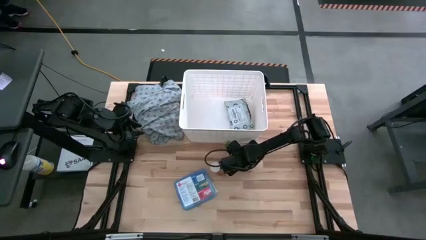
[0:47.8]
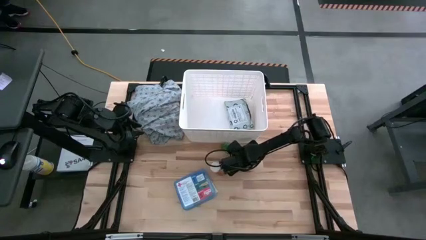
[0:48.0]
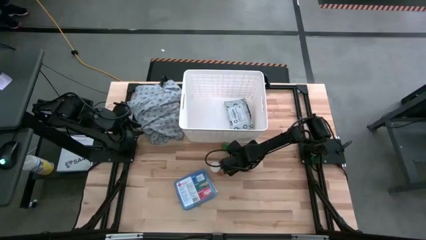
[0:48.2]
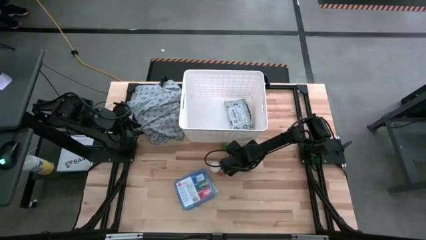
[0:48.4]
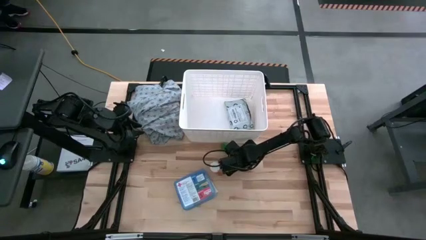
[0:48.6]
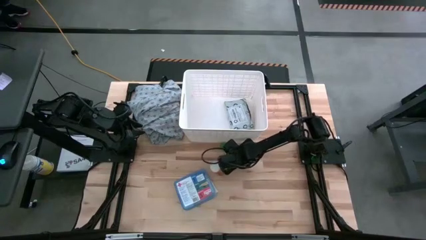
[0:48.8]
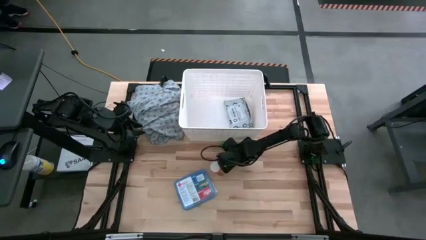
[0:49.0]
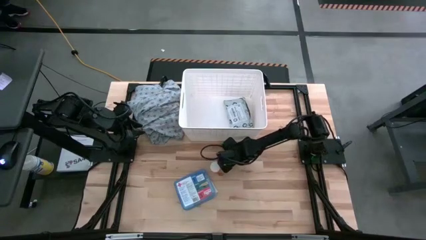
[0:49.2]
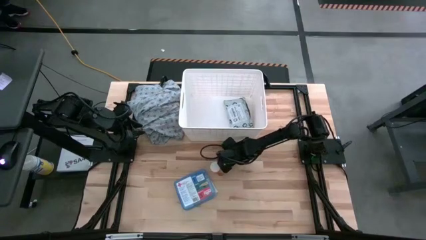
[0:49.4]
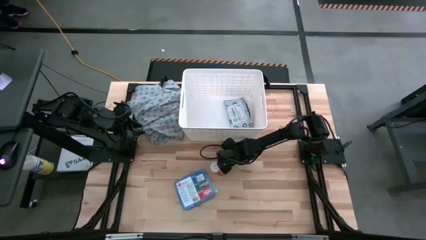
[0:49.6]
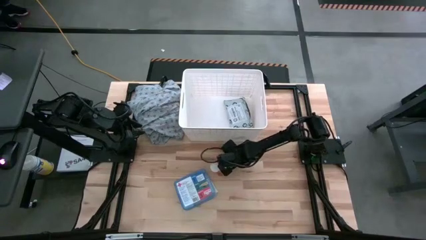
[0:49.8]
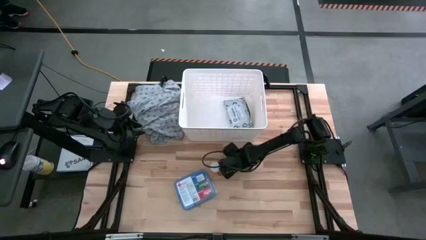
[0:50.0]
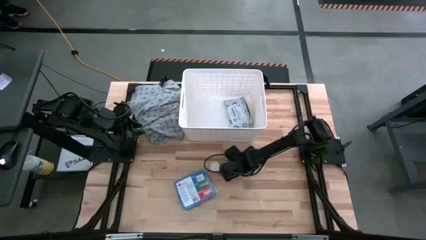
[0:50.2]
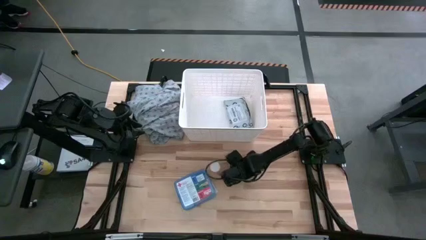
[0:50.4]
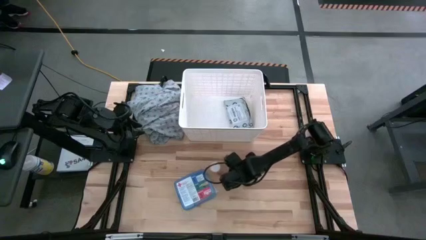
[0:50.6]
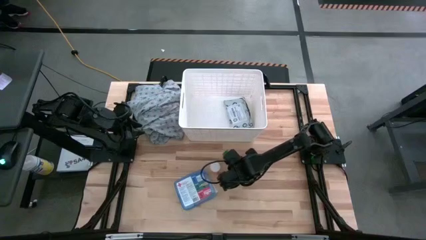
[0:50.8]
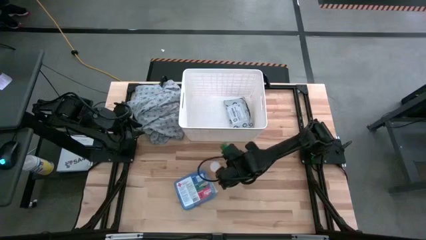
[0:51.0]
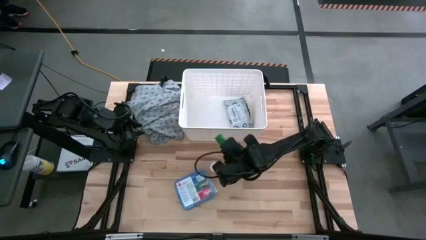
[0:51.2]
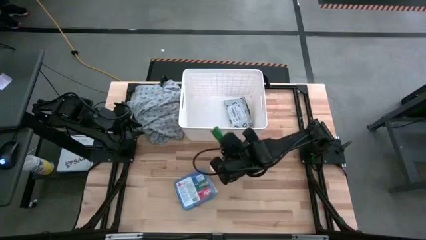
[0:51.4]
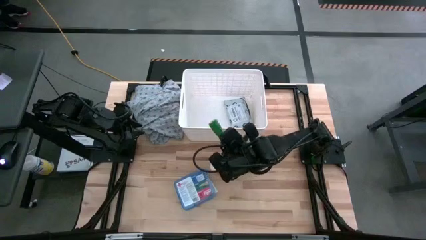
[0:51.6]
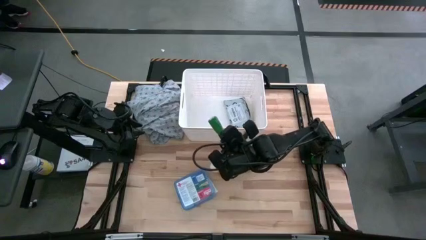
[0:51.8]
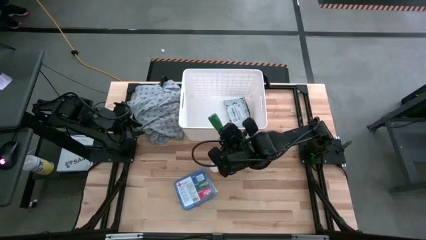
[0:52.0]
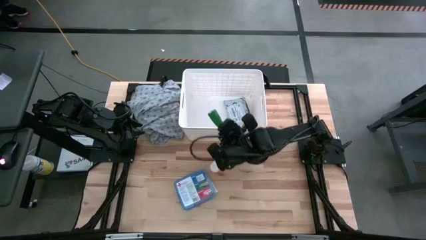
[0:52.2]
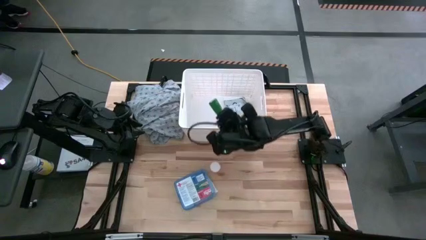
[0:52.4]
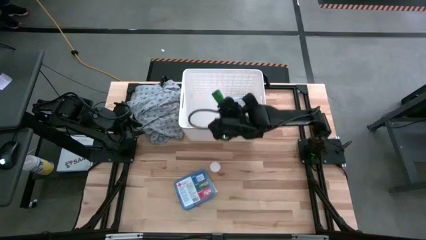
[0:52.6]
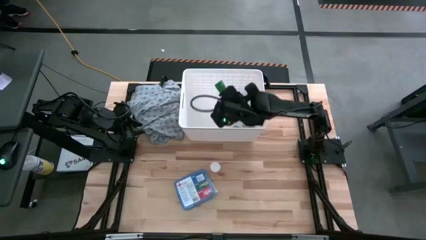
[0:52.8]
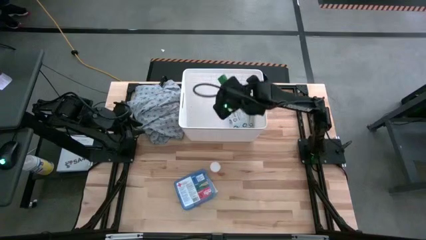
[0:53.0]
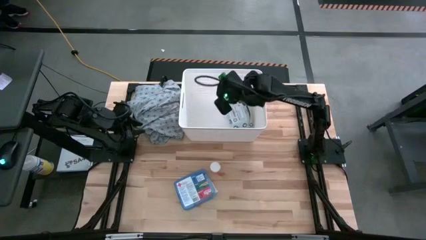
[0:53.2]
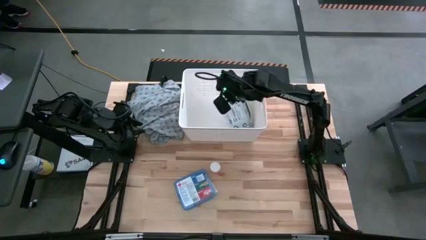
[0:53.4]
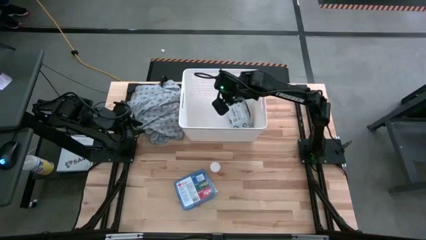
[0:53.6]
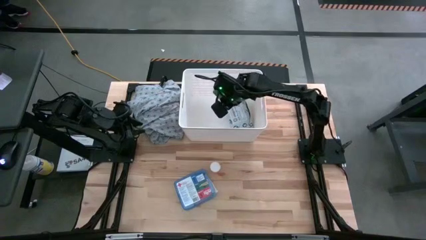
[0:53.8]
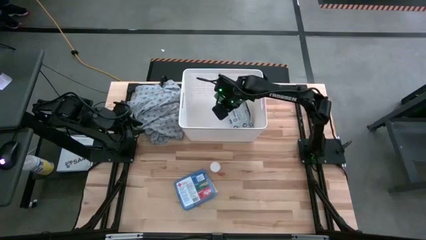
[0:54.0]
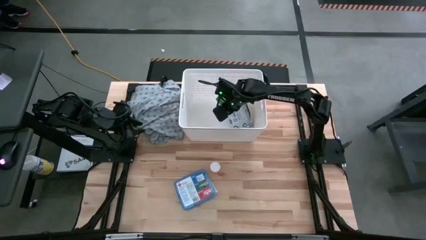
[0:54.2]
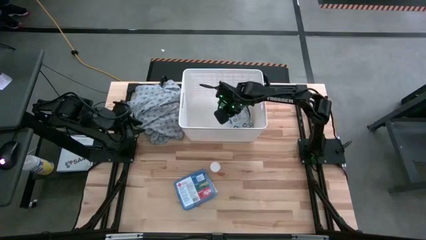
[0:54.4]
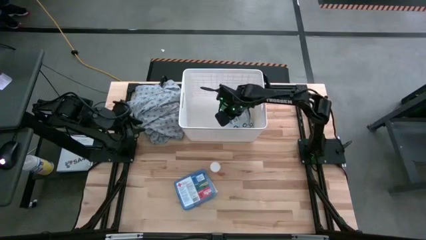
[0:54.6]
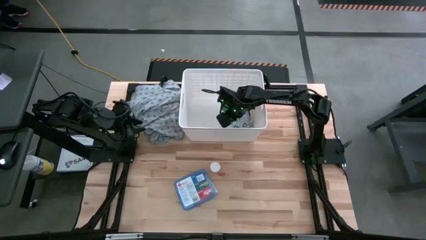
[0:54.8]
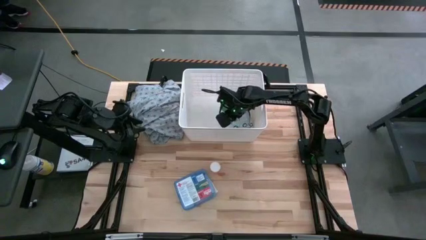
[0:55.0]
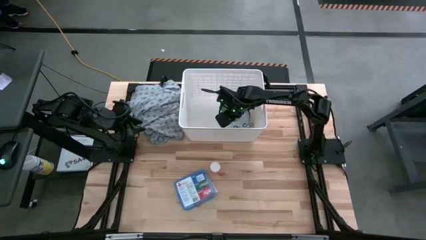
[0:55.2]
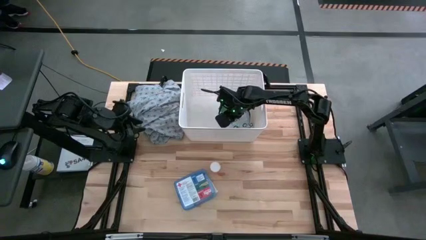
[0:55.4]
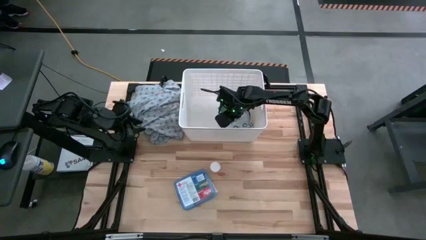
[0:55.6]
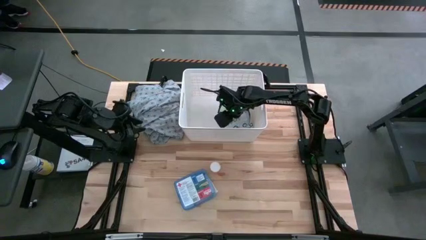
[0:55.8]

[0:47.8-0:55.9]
Task: Pick & place medical supplies in basket/bin
Put the rolled green bandage into the white bin

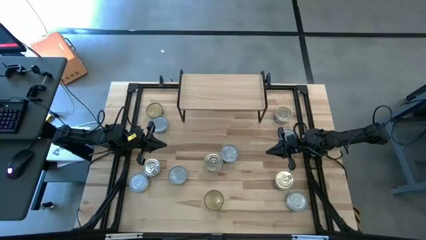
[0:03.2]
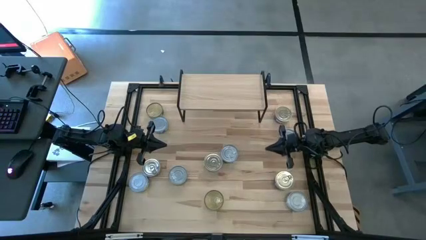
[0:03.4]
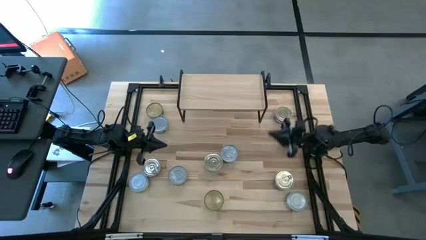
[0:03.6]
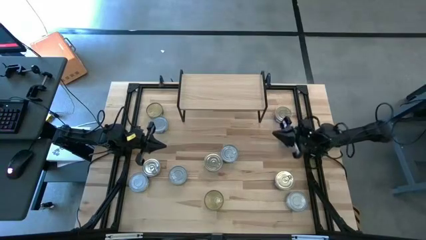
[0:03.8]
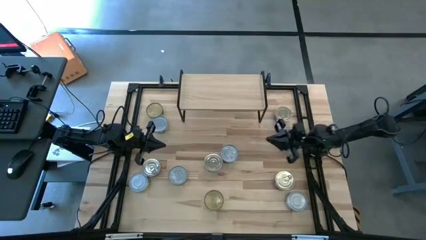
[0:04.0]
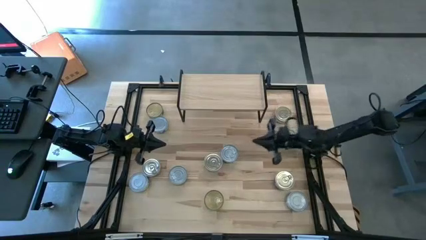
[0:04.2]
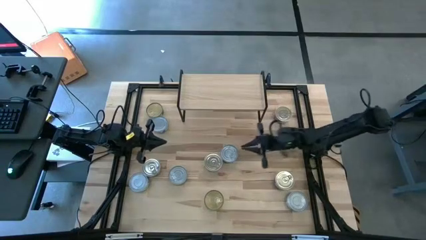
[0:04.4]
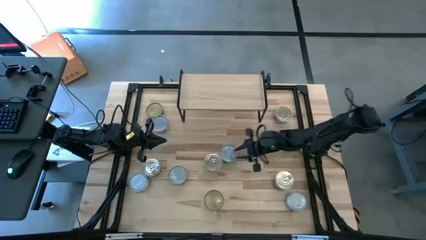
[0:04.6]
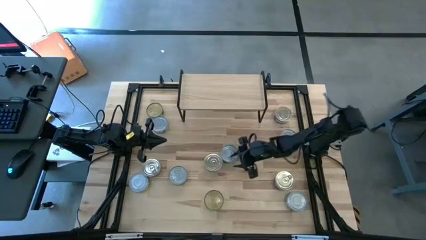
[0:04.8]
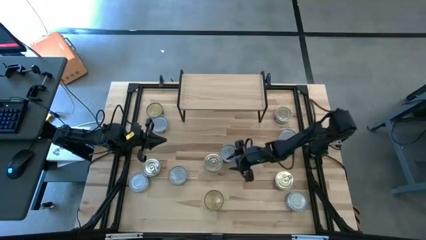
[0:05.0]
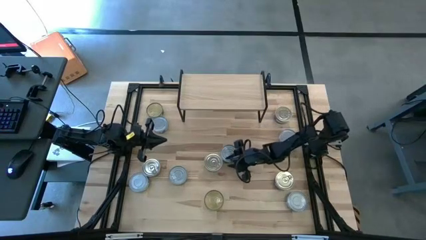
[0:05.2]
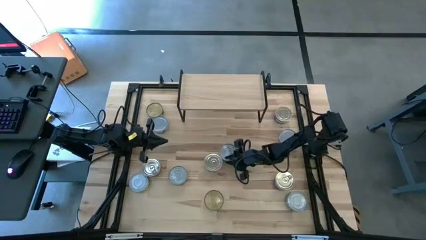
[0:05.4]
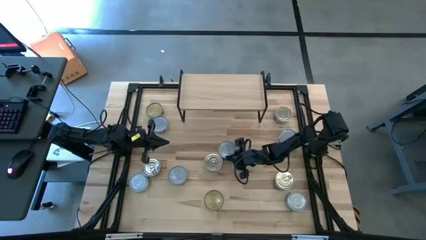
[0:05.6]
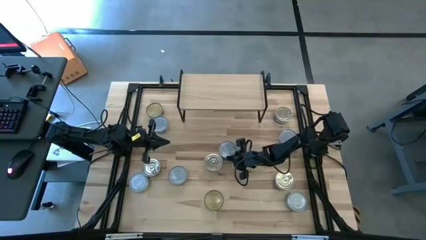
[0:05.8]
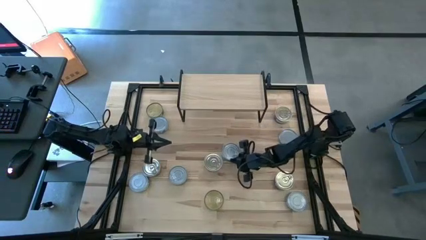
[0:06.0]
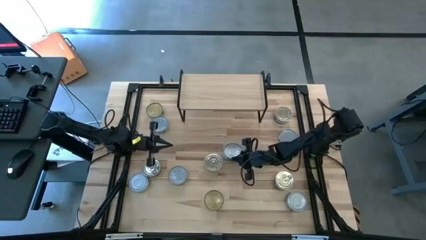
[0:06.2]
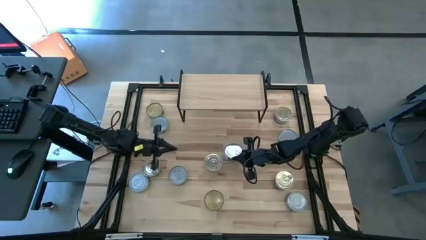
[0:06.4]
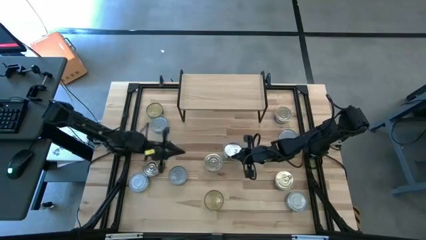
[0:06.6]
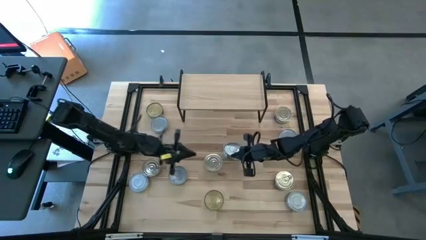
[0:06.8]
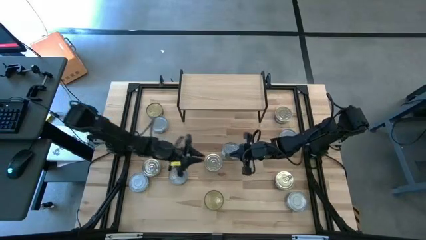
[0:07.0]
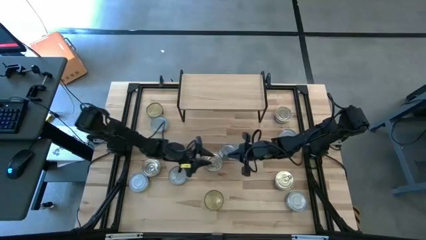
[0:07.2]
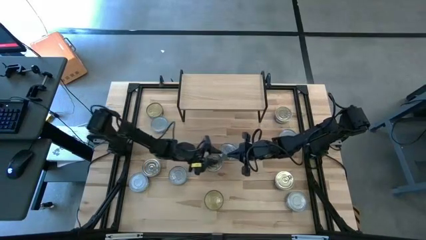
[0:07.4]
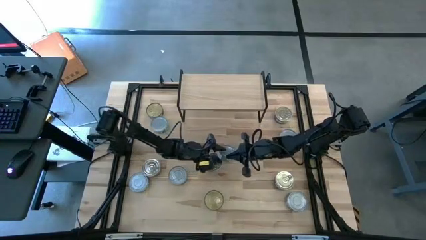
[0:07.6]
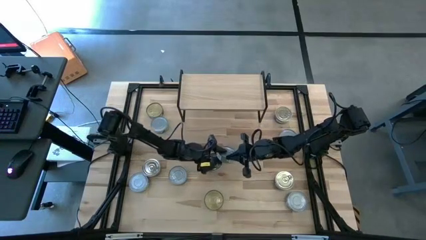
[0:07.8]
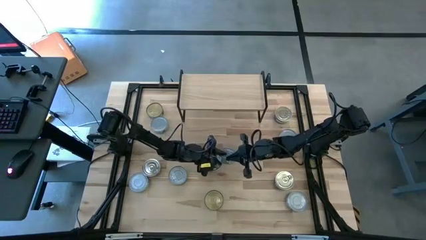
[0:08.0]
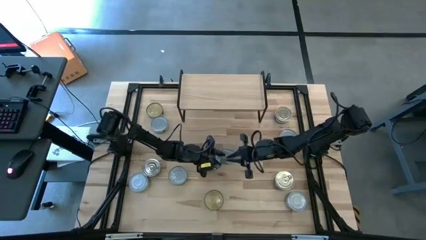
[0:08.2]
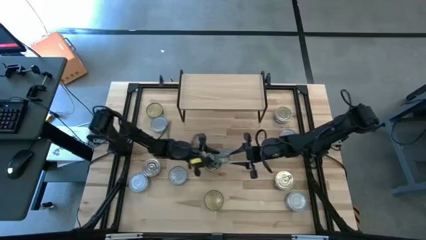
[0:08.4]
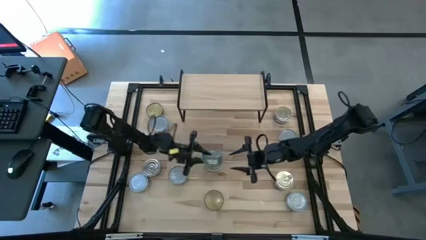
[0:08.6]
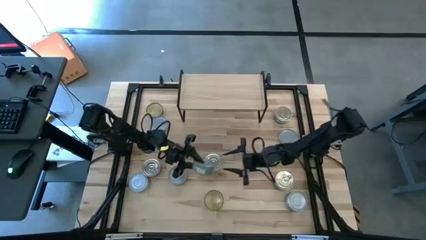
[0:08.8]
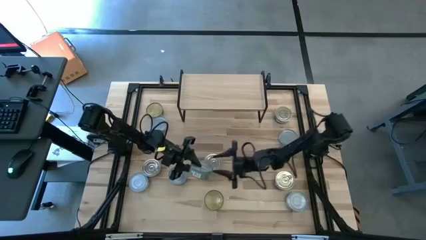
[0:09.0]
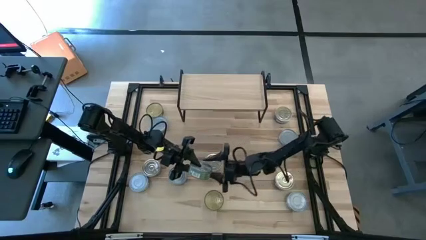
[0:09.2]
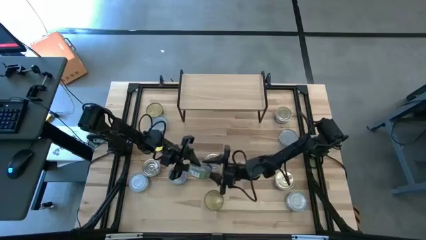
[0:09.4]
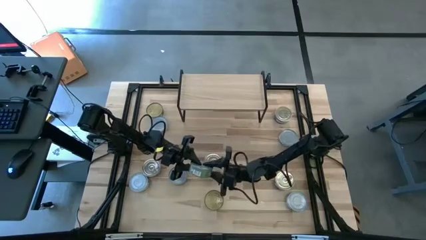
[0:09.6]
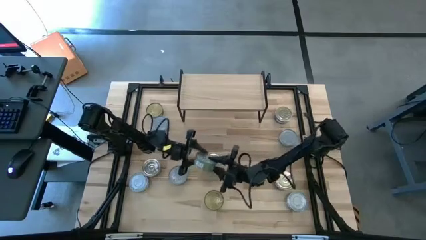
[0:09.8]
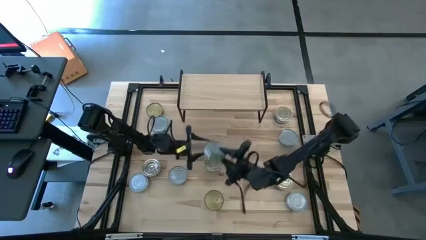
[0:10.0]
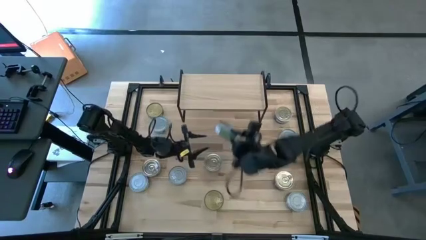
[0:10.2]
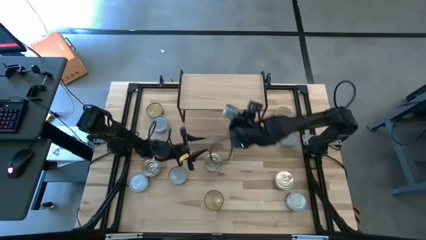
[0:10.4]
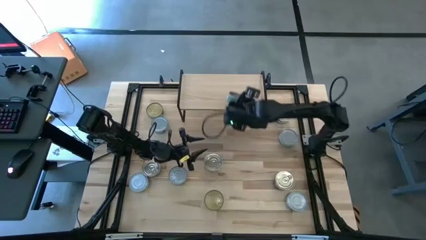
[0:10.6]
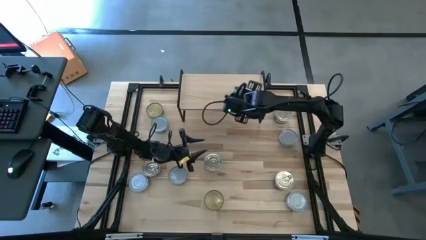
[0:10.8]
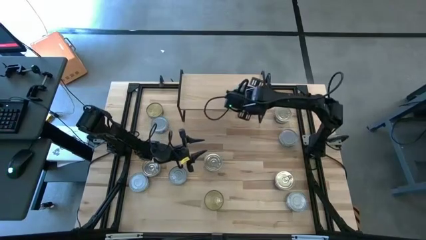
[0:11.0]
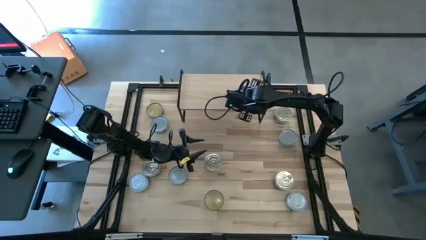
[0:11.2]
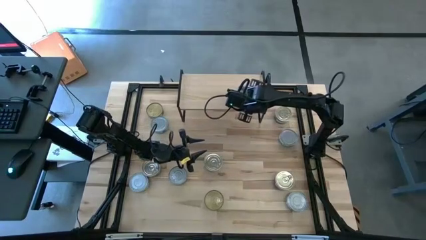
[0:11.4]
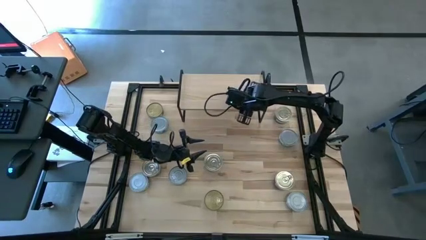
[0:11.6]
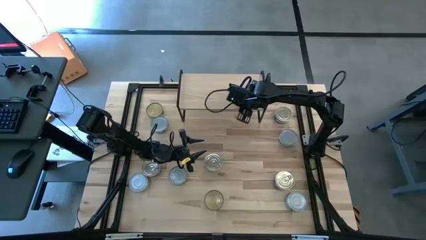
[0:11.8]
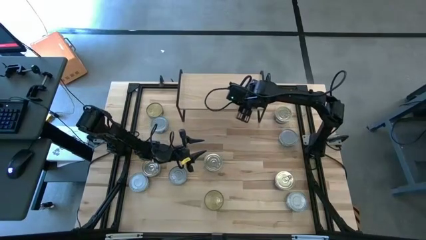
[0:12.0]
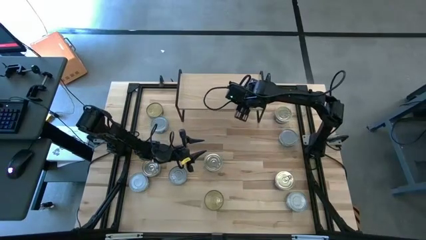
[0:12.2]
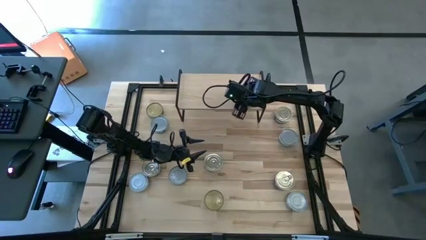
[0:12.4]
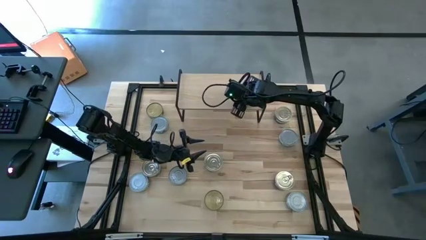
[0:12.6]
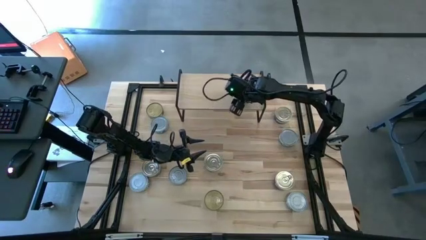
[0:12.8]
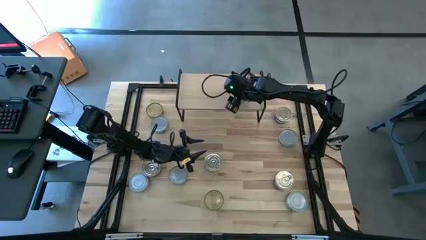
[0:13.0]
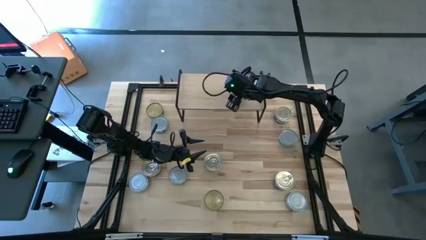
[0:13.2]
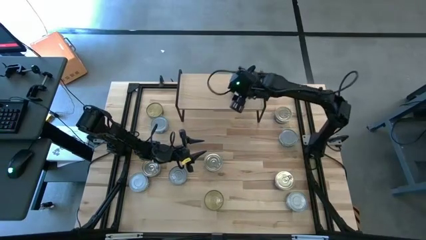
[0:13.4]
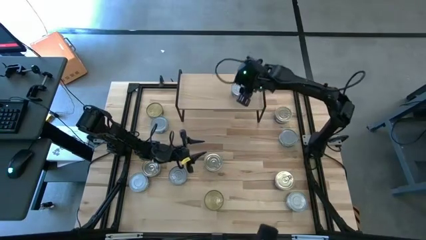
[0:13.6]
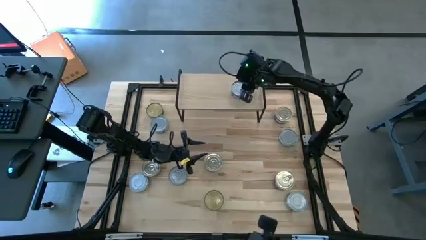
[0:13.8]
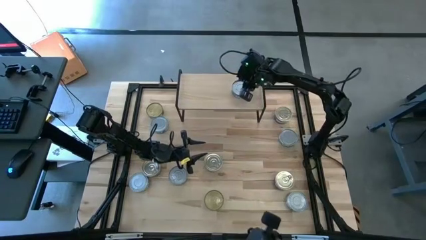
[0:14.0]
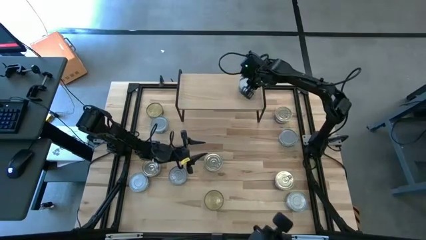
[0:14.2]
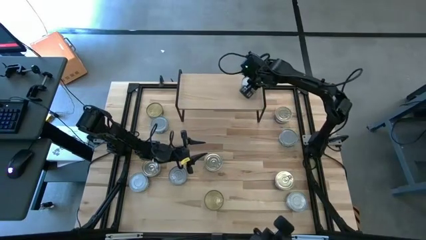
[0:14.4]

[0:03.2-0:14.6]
Task: Stack canned seafood by type on shelf
Put the green tuna can on the shelf
